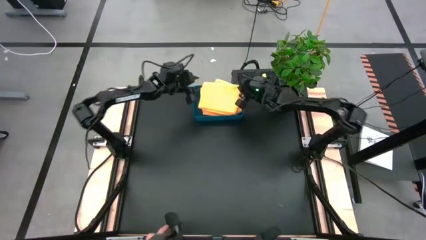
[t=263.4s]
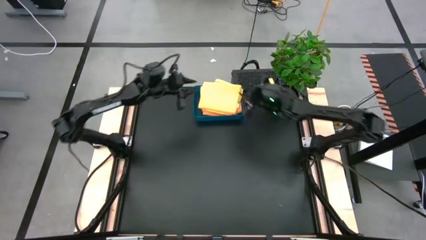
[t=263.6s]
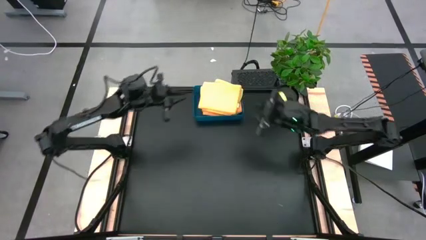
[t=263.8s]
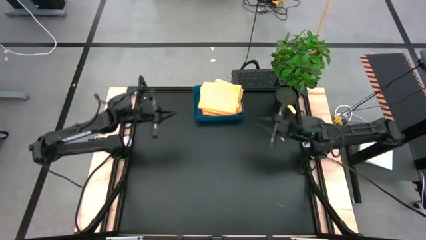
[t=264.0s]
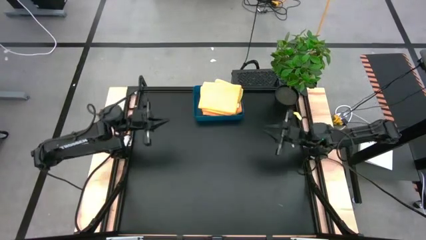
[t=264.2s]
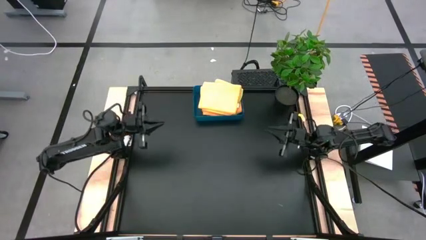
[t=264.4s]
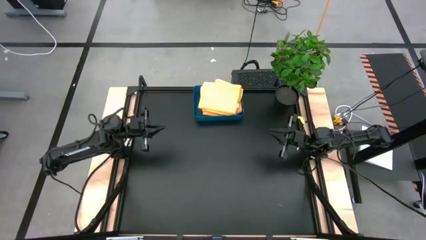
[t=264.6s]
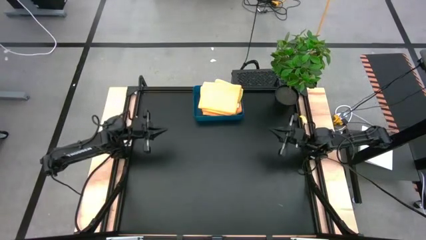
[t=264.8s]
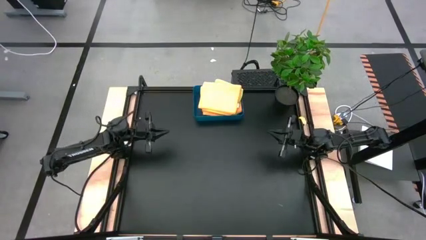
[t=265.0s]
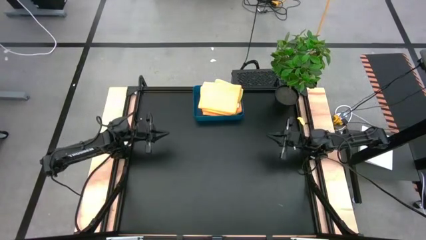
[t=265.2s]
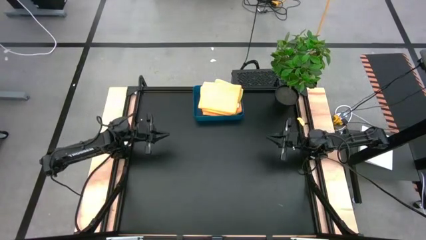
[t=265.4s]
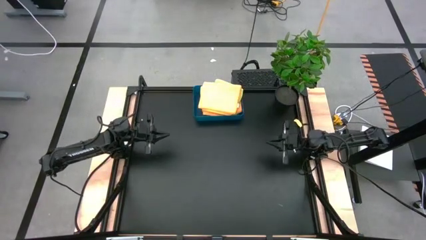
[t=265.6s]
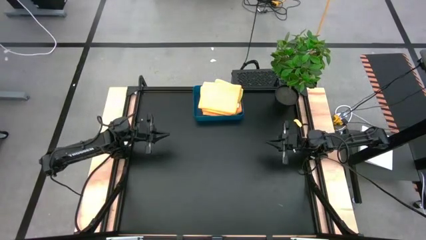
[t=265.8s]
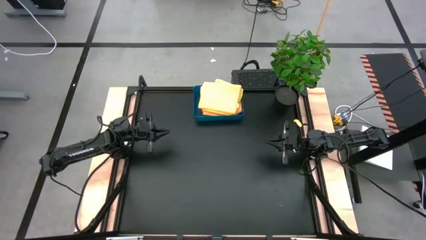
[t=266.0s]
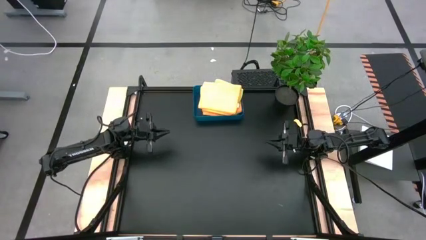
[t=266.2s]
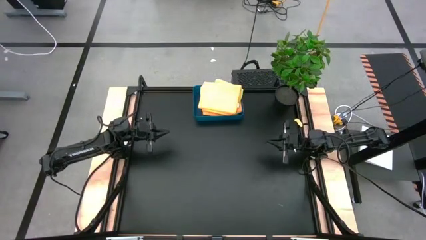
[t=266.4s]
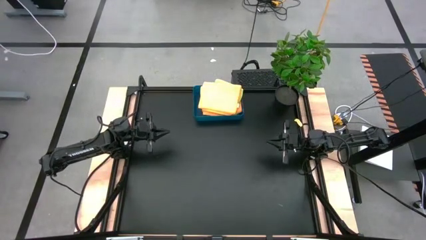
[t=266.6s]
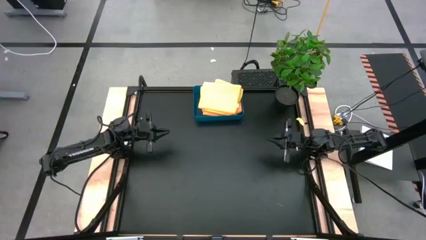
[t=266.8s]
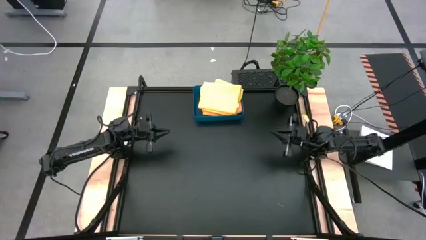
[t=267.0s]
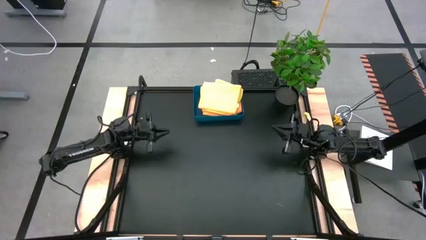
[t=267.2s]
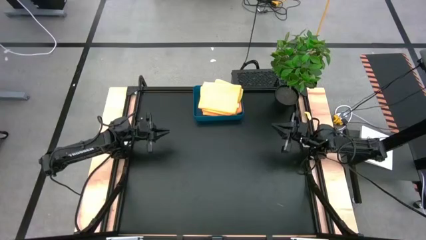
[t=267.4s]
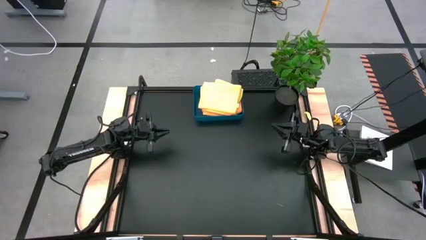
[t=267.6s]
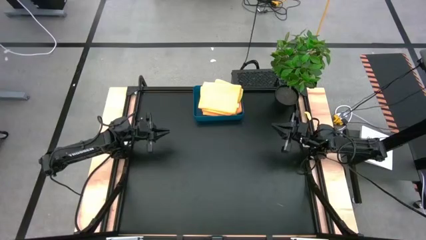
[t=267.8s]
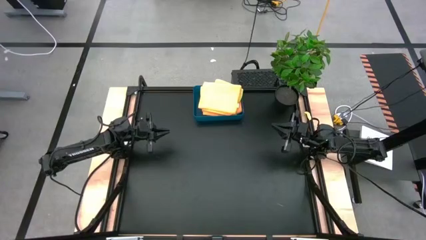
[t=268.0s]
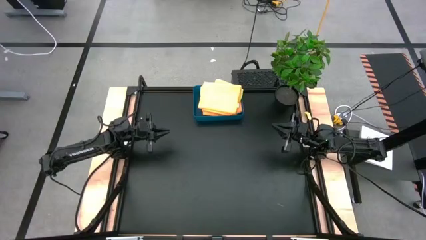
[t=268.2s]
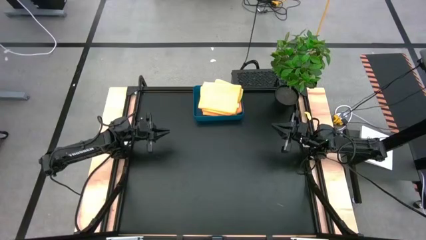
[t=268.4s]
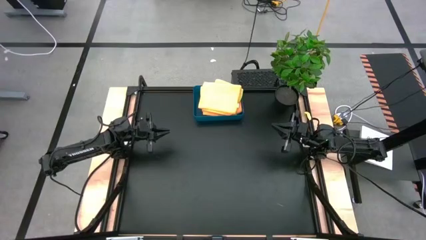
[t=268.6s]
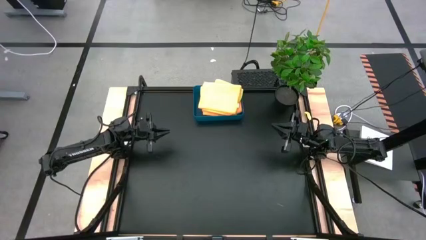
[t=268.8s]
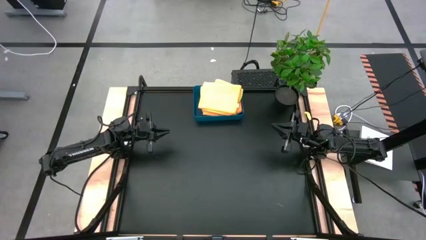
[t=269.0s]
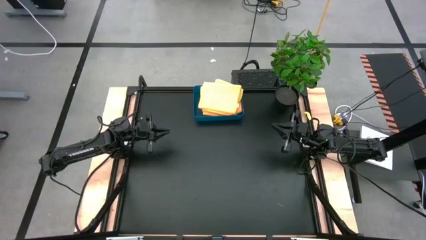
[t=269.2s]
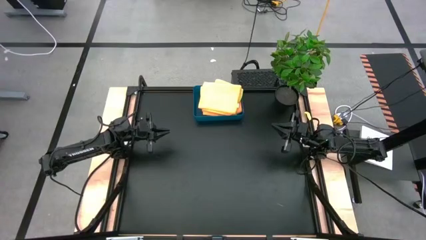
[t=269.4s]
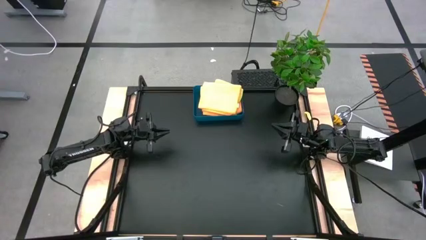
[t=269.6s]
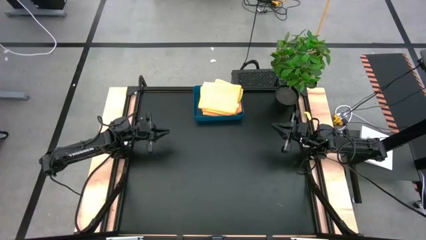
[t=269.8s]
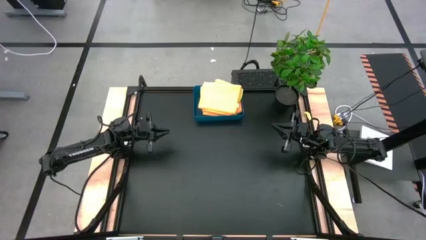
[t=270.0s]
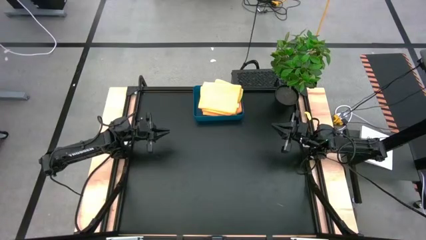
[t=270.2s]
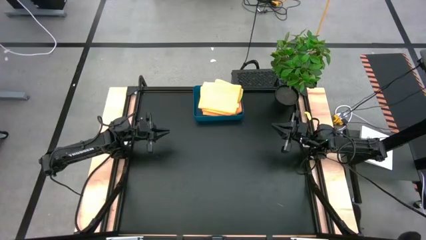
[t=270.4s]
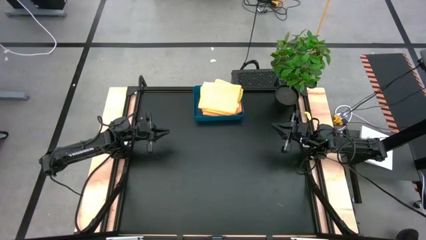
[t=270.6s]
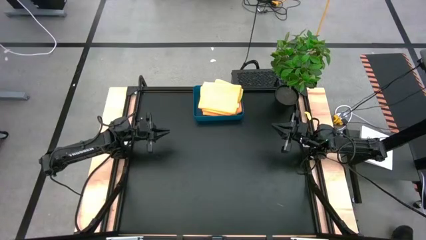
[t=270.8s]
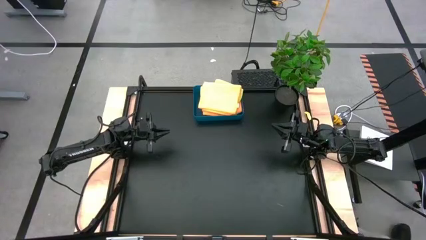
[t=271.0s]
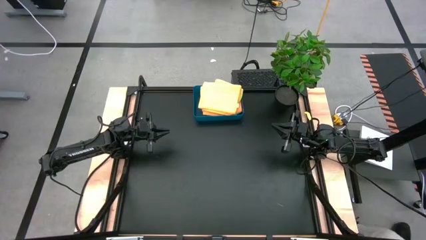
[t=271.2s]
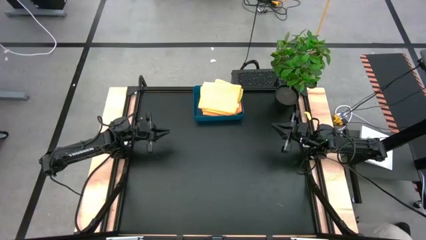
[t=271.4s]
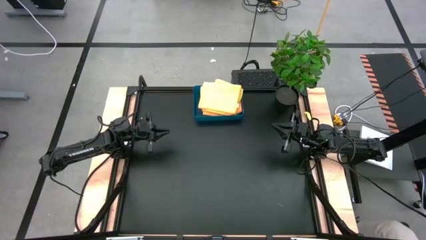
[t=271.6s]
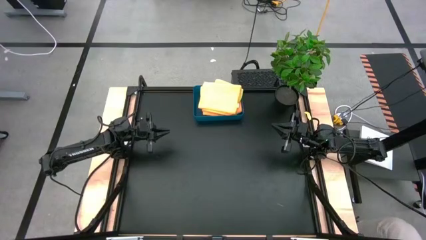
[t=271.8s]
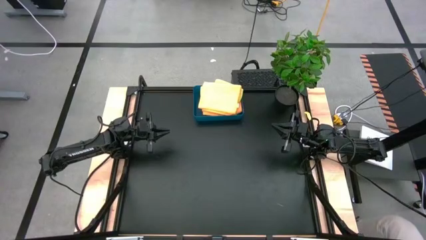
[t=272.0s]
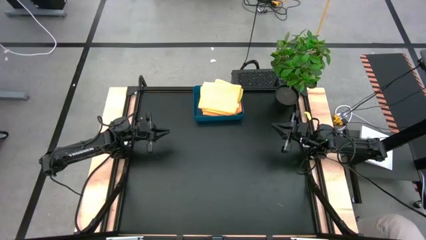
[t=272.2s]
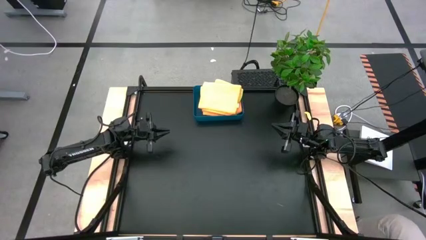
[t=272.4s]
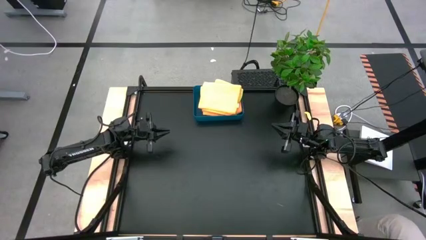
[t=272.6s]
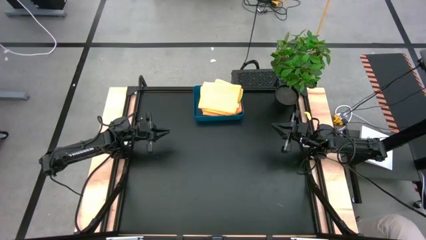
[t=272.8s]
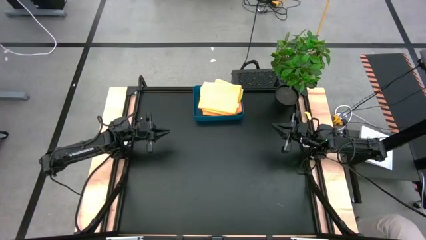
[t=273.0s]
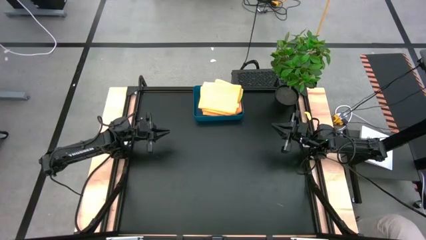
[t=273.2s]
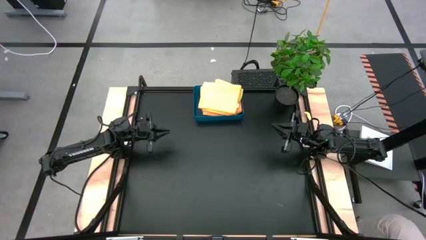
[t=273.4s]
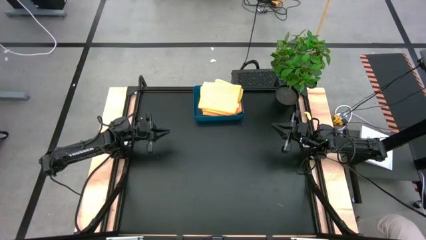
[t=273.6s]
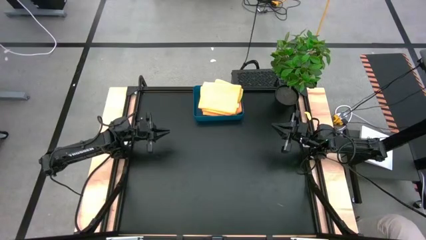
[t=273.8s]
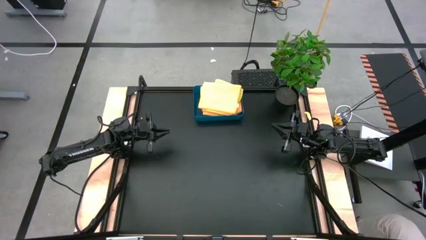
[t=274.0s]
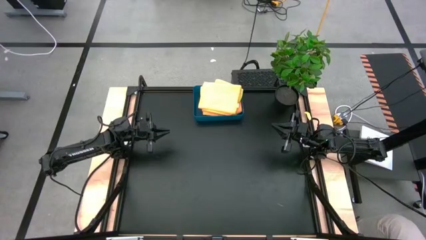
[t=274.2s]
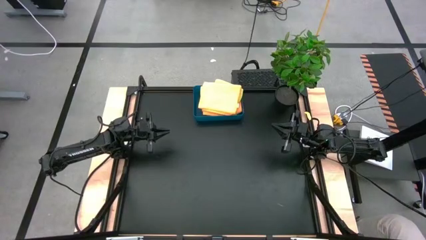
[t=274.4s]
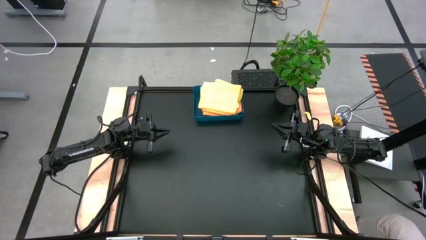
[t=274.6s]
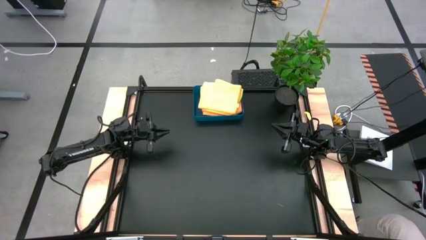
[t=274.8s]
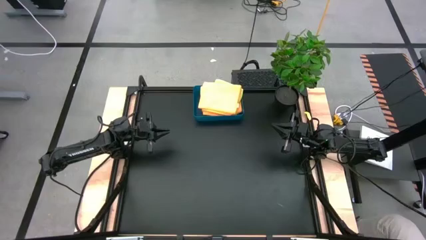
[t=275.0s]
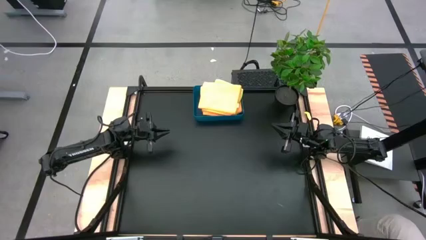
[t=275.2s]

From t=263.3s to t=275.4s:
Task: Fold microfiber towels
Return to Home Position
